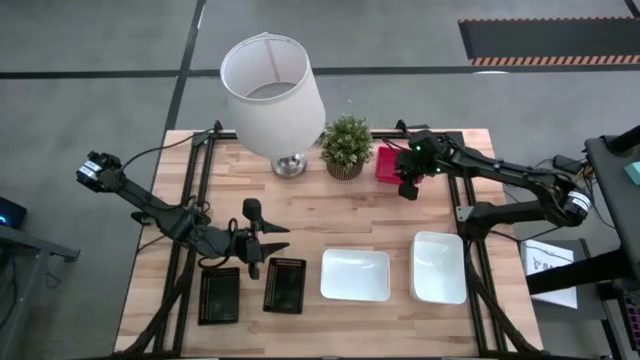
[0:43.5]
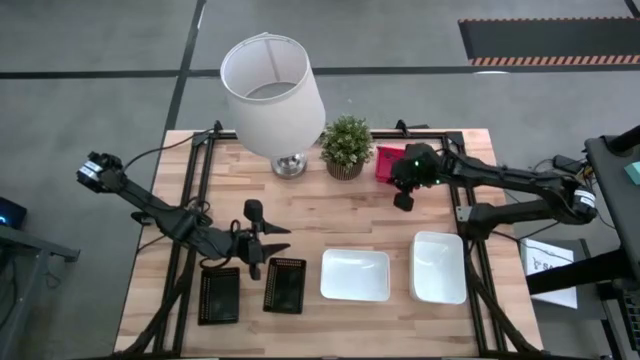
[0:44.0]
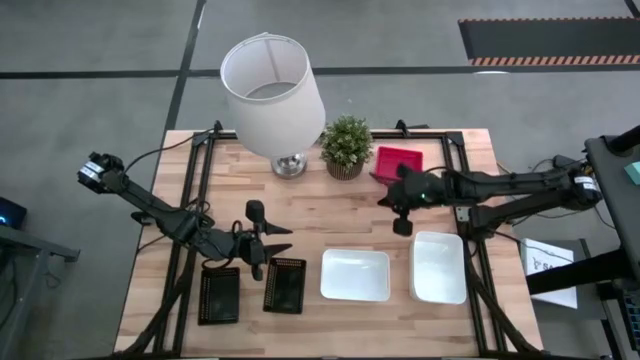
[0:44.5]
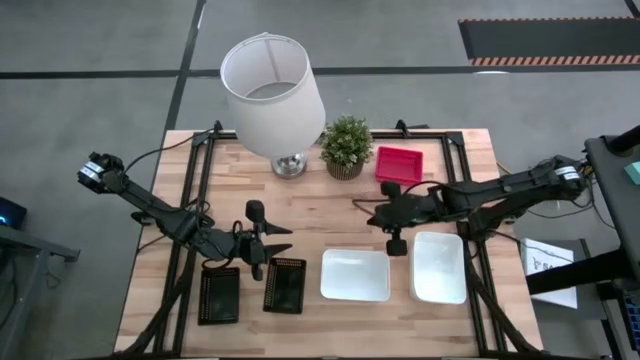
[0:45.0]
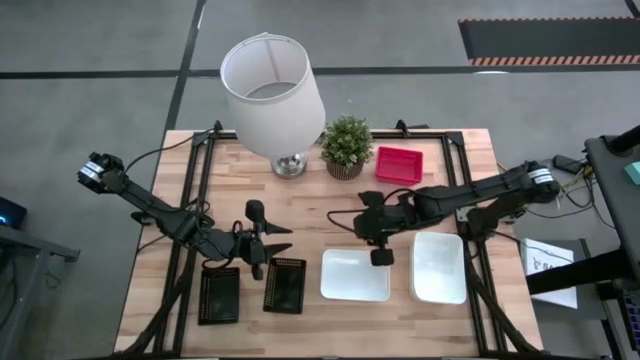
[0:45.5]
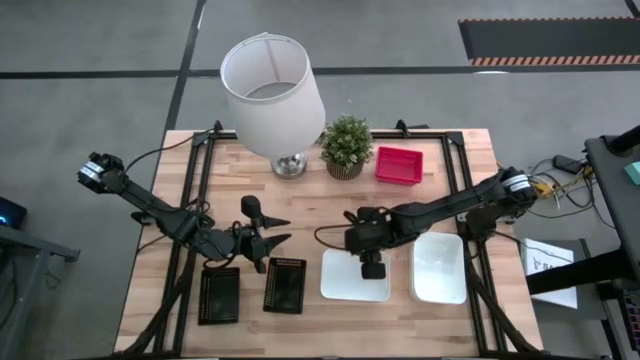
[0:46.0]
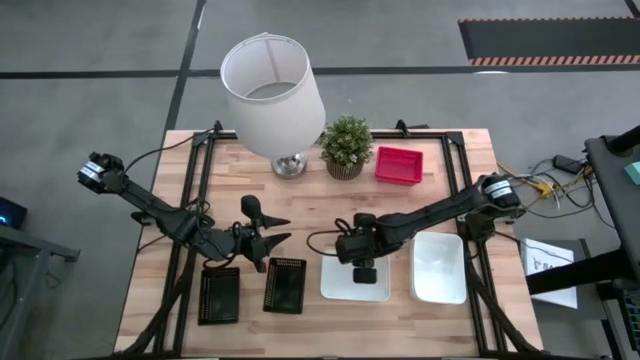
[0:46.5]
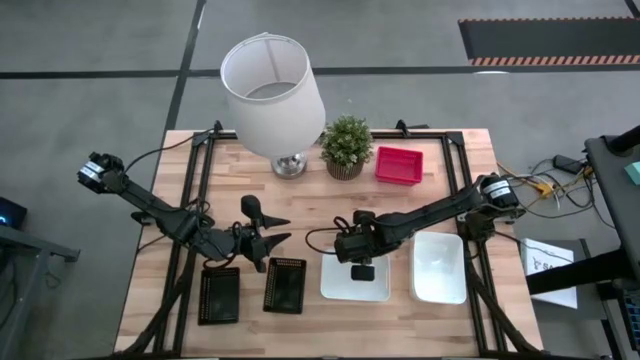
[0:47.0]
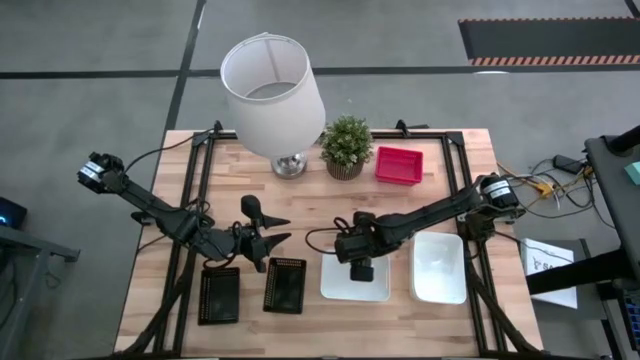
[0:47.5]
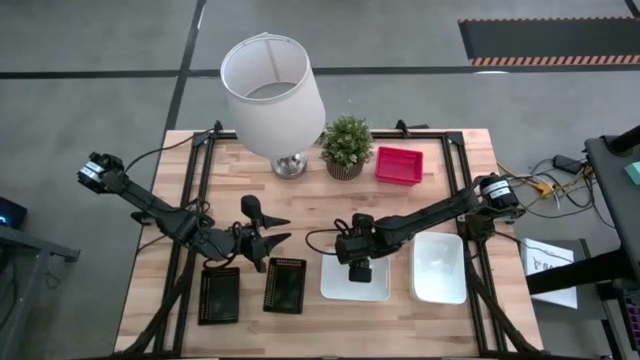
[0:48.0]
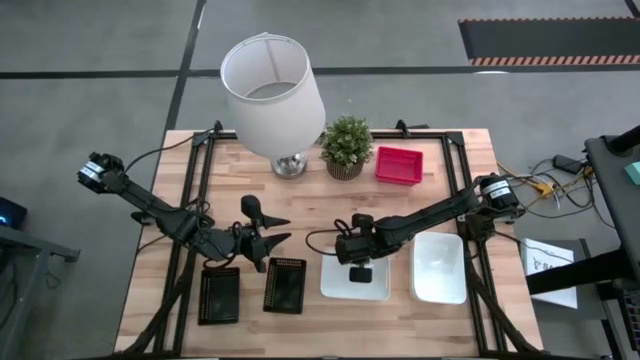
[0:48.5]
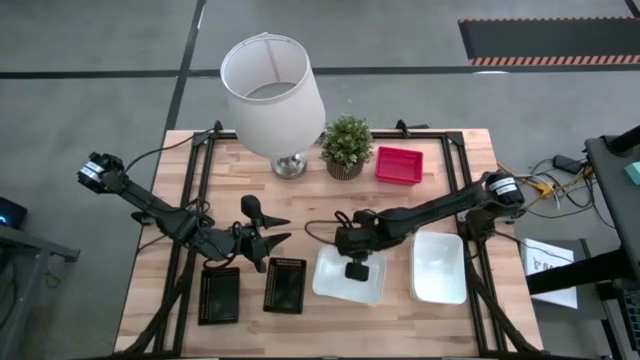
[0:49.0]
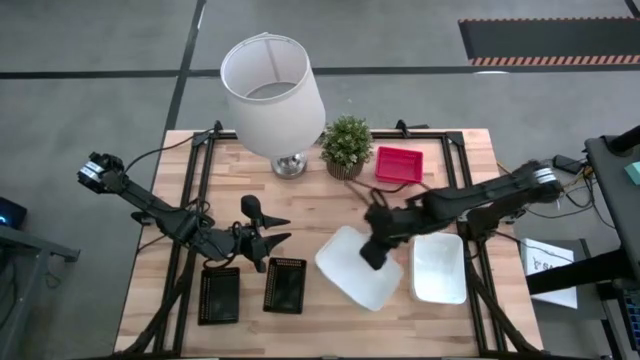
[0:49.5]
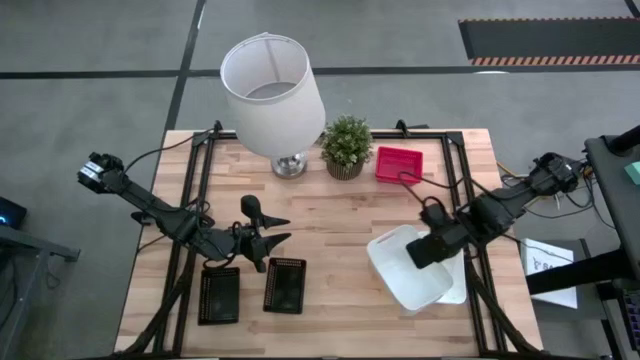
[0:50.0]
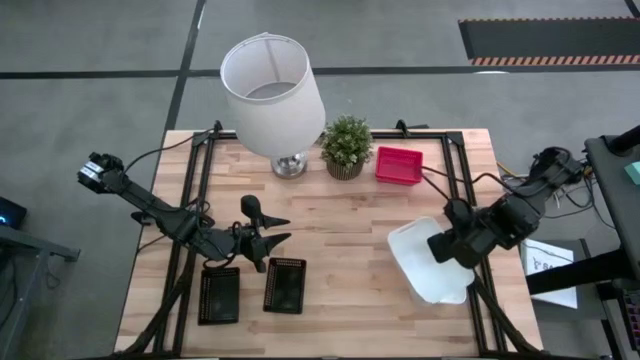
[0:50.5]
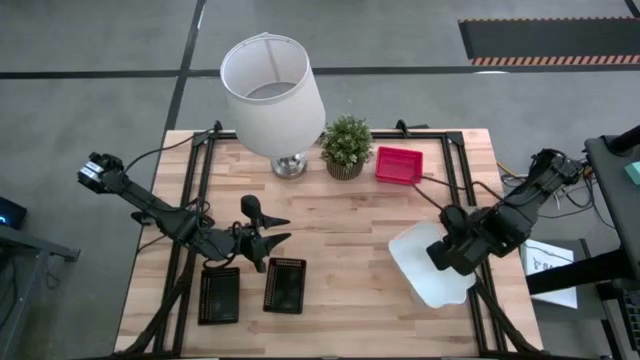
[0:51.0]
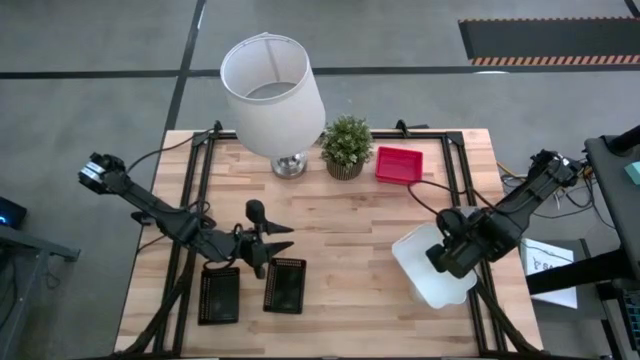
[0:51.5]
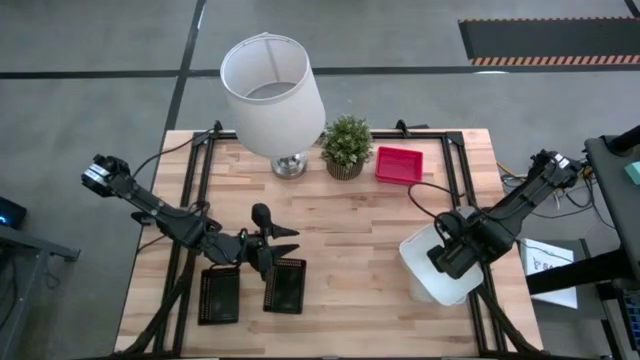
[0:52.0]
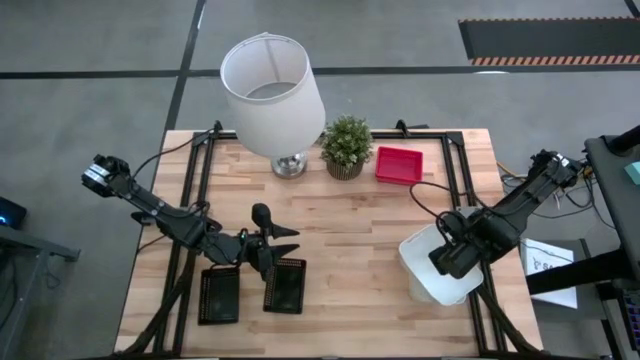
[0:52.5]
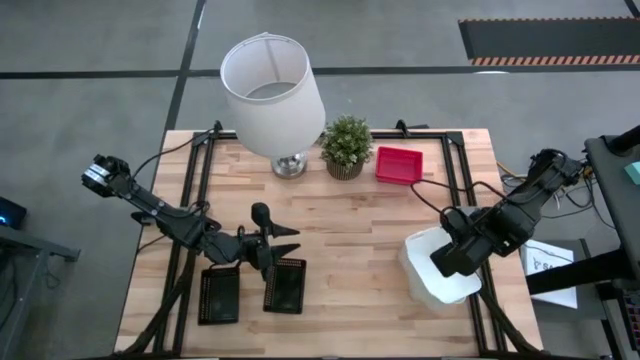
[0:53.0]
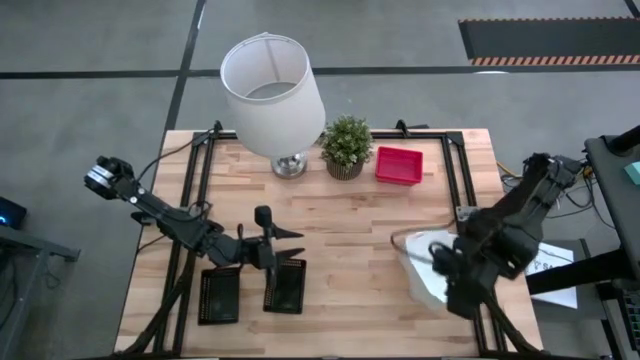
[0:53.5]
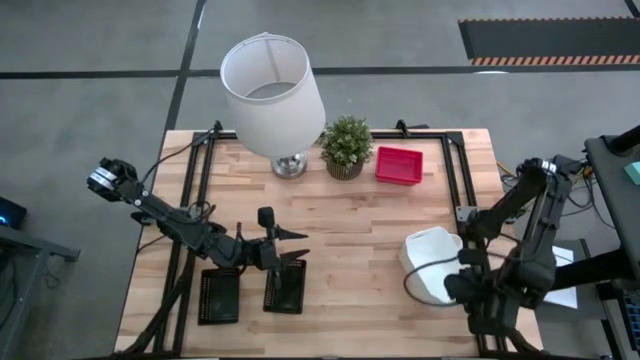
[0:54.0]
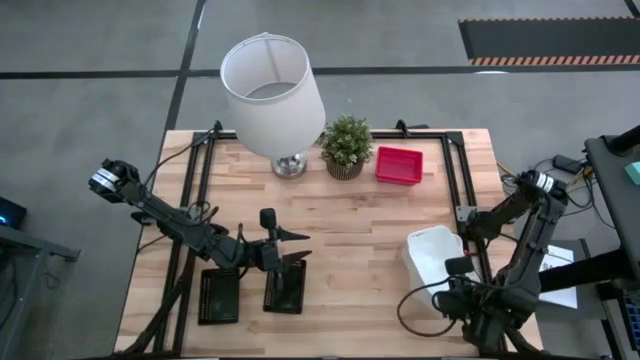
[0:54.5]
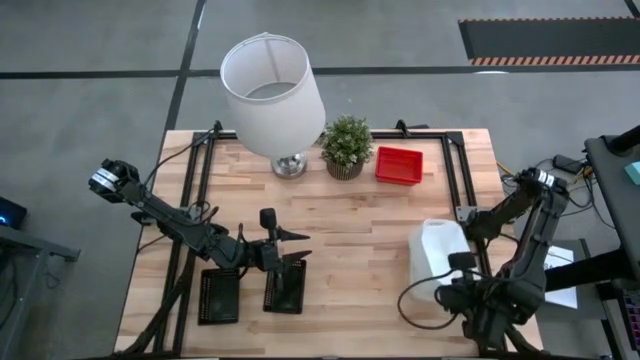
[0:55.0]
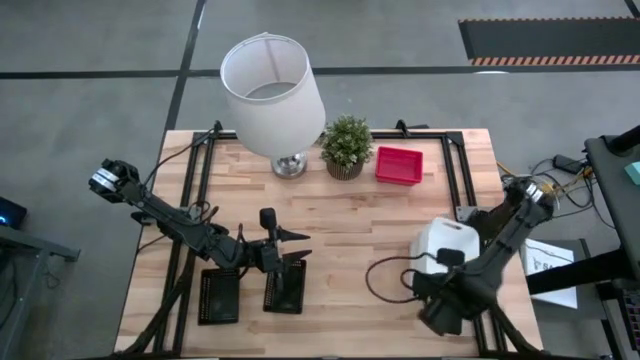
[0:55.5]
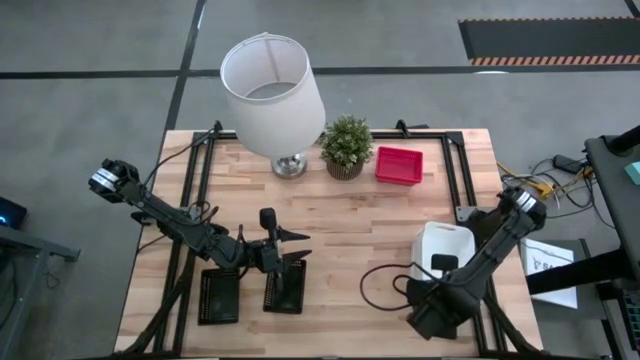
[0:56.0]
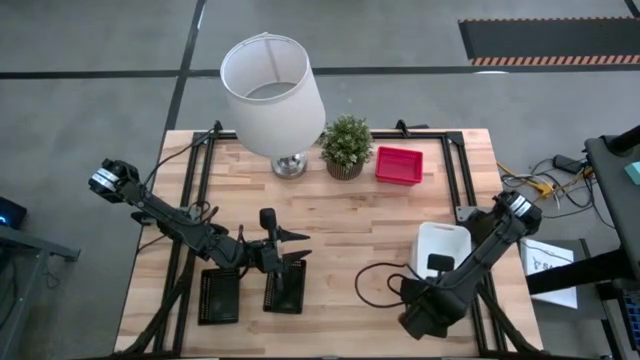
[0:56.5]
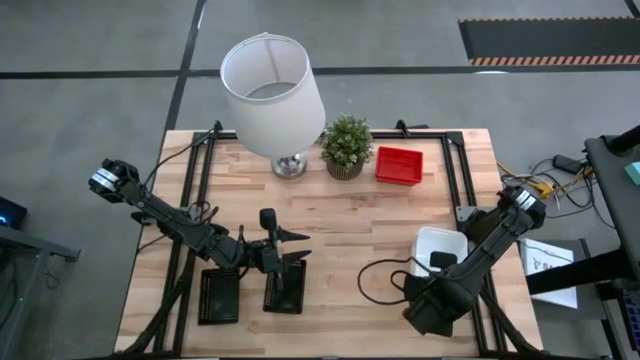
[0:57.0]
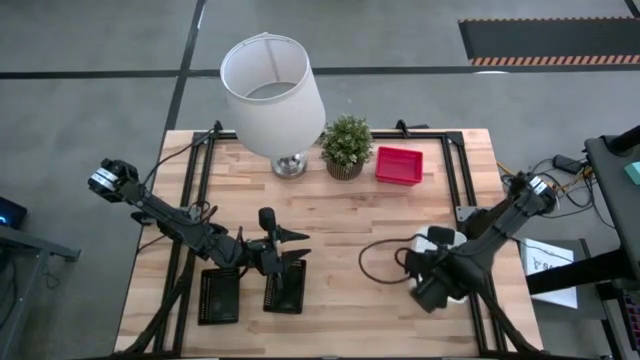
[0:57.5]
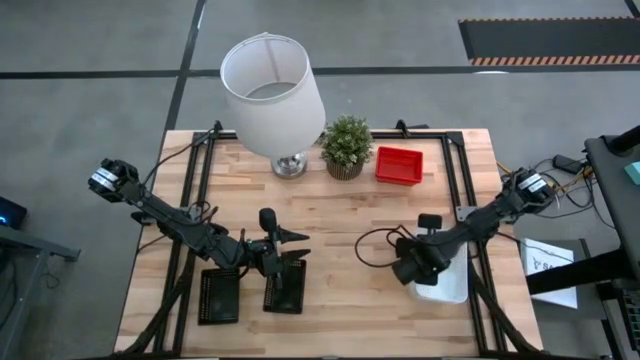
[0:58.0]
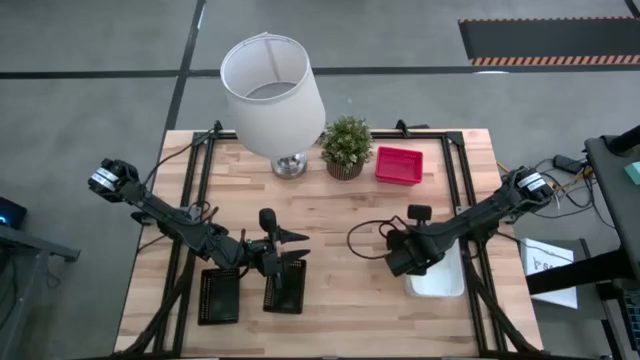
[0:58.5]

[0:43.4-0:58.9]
Stack the left white bin on the white bins

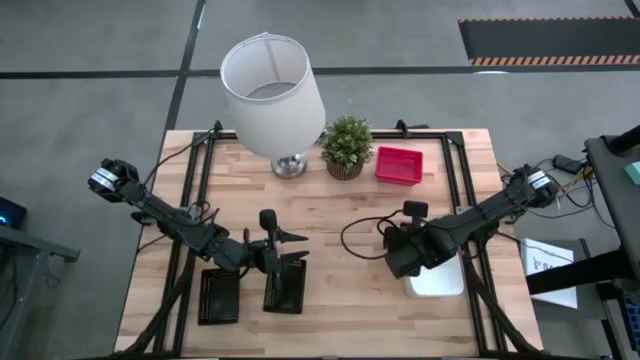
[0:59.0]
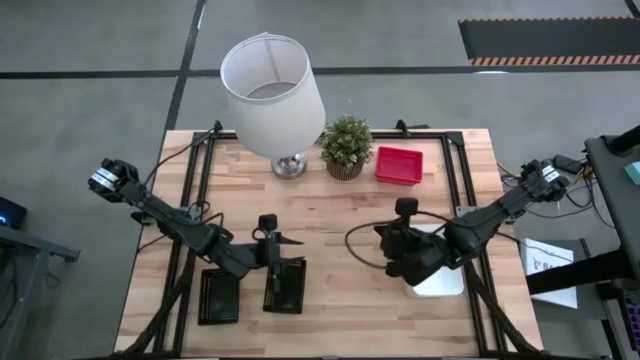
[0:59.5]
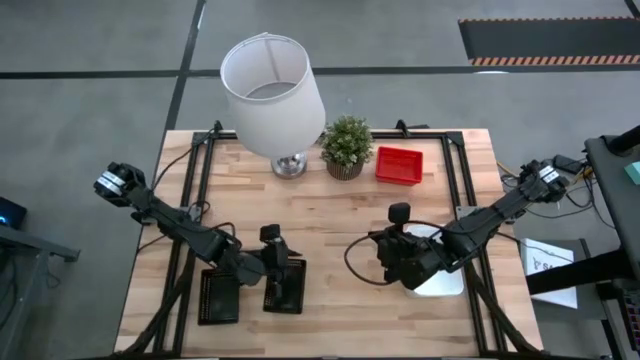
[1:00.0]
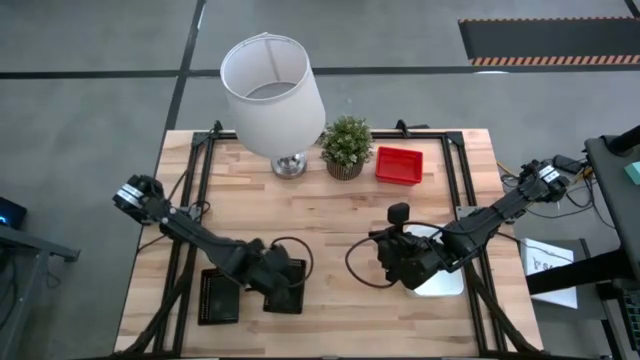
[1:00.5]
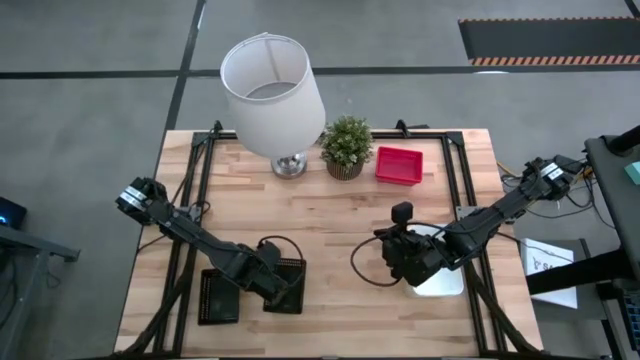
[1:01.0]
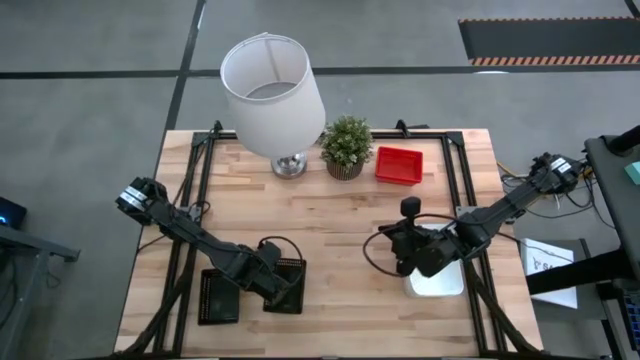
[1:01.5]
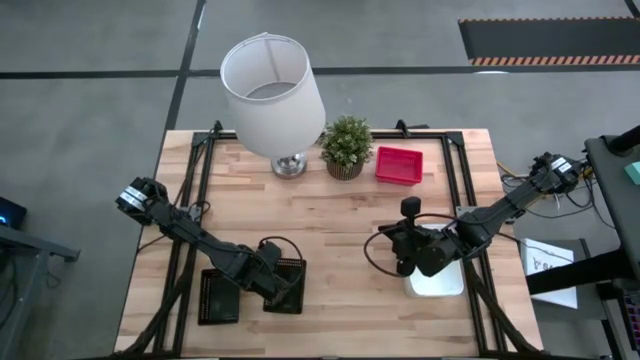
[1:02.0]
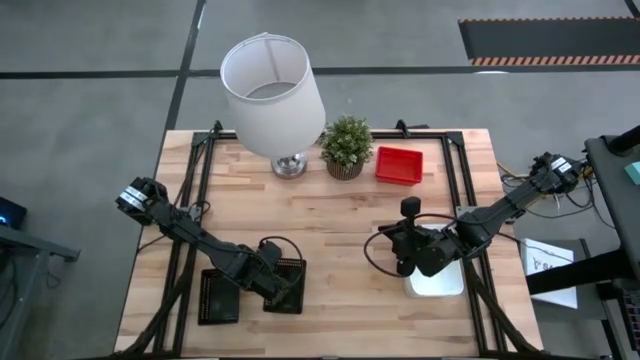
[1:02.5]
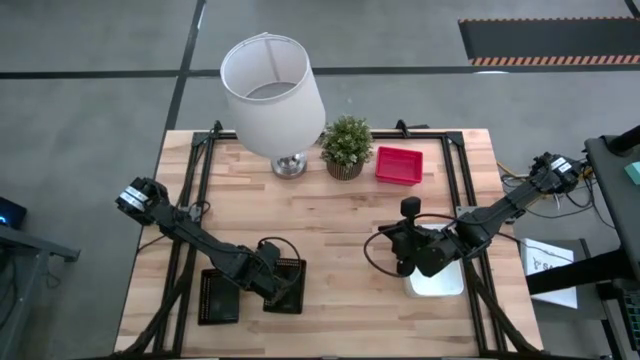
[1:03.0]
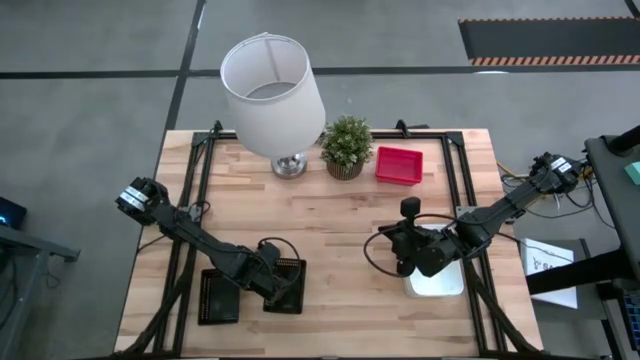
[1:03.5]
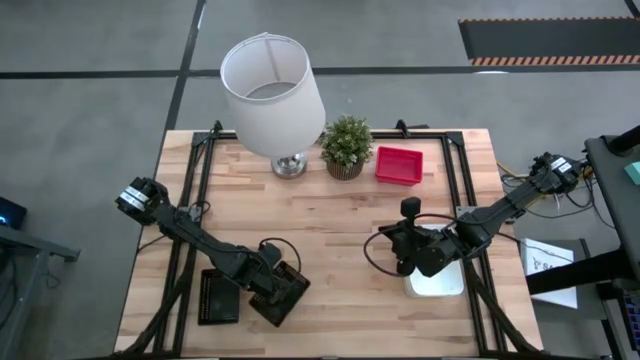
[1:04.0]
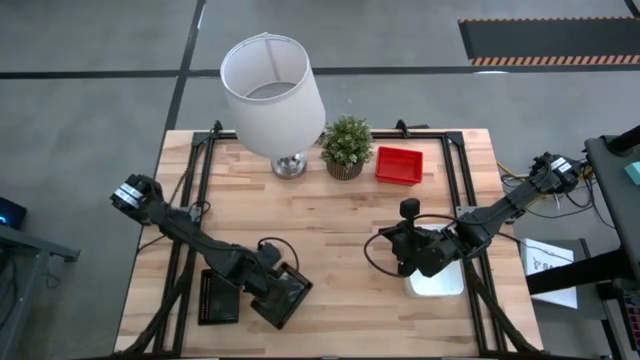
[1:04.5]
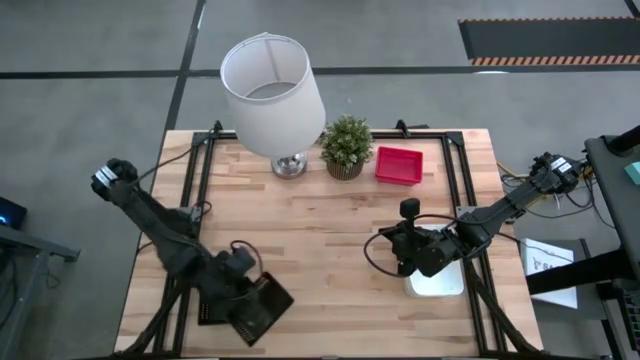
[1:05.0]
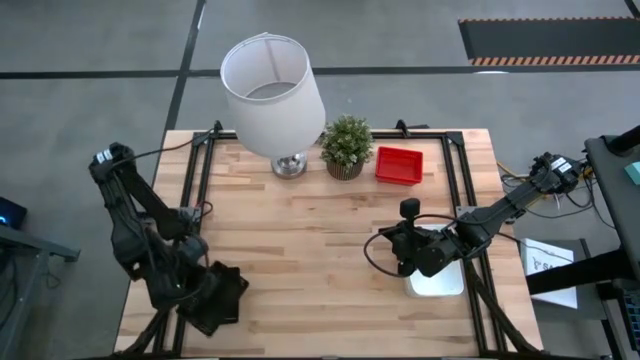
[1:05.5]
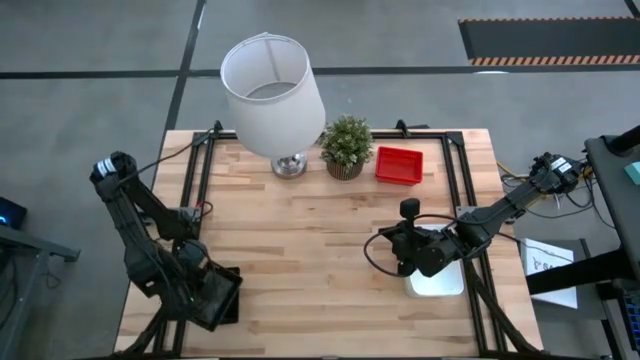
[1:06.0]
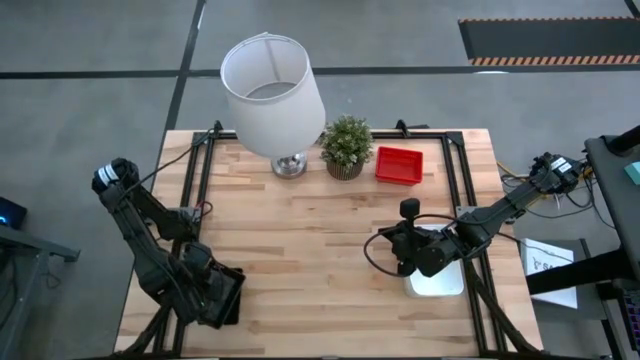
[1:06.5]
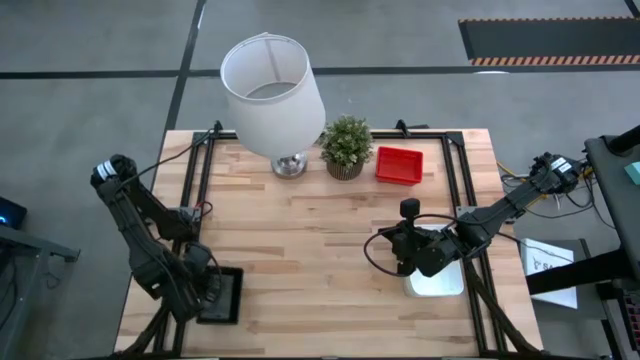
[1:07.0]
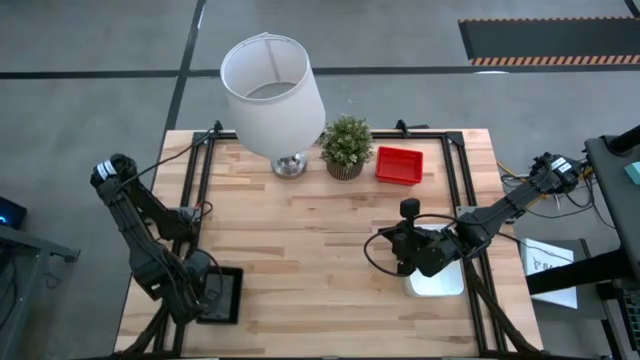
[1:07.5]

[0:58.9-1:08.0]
Stack the right black bin on the black bins
